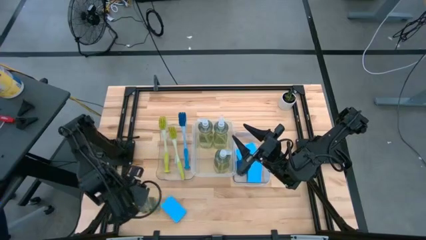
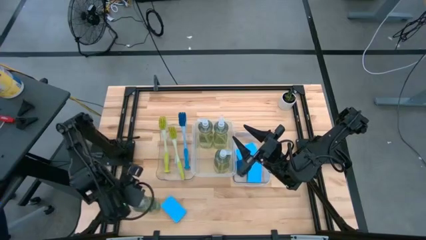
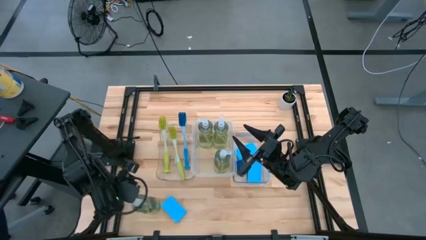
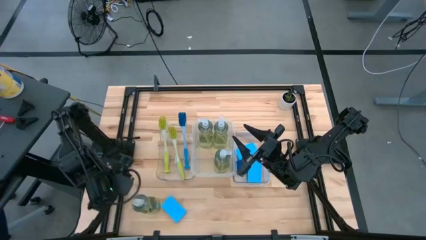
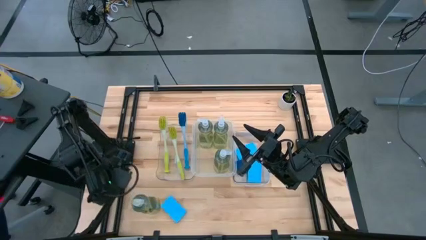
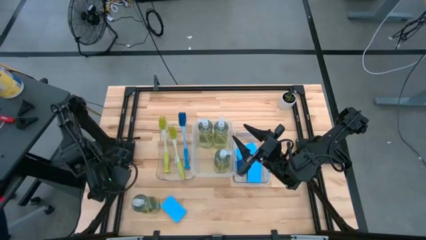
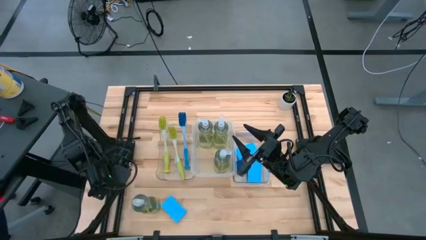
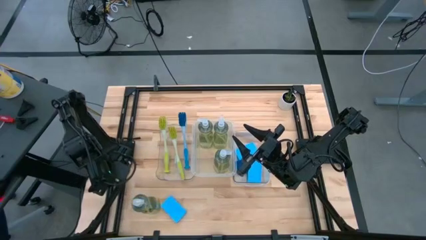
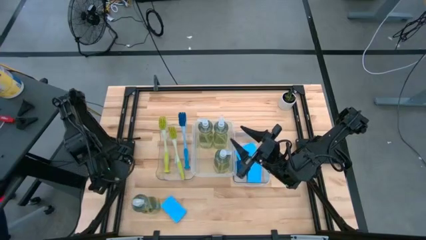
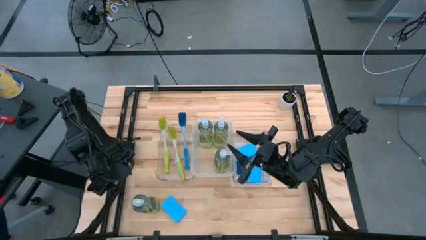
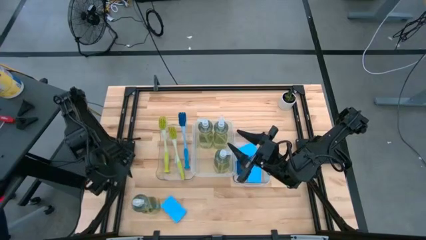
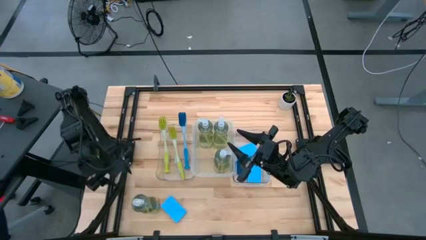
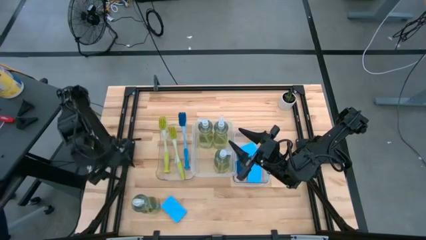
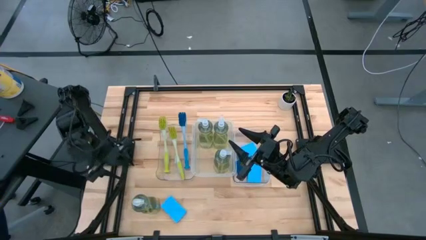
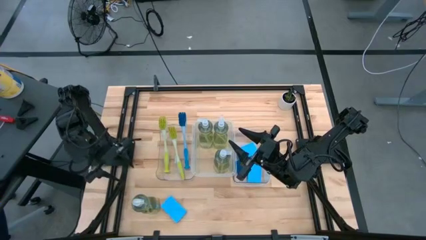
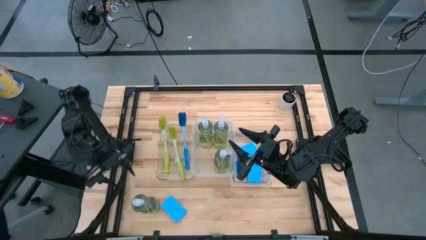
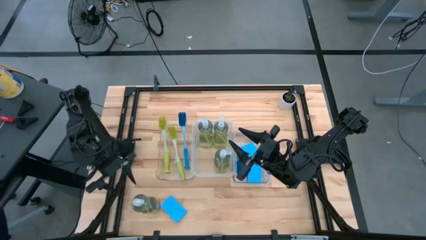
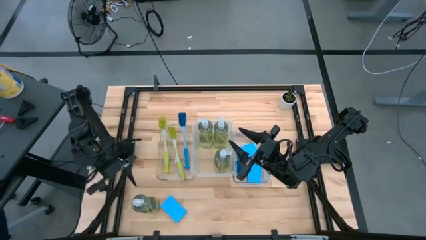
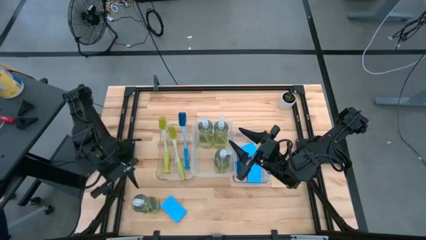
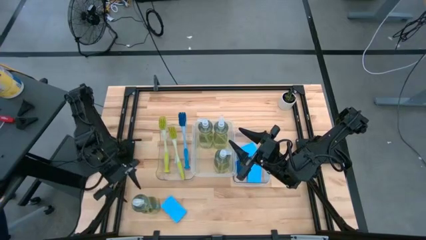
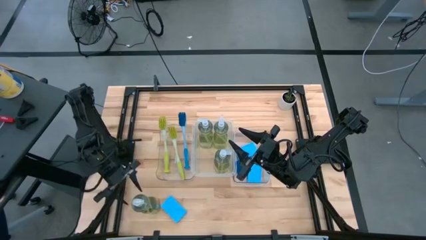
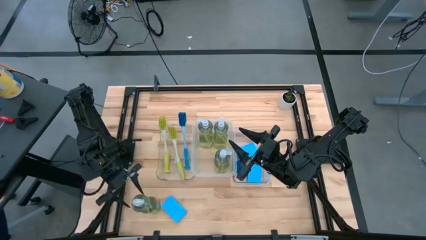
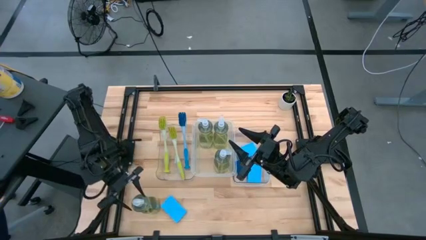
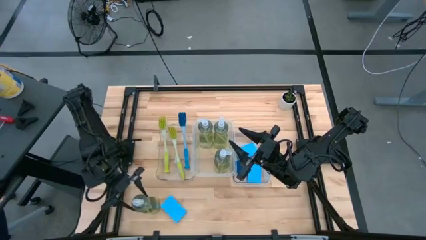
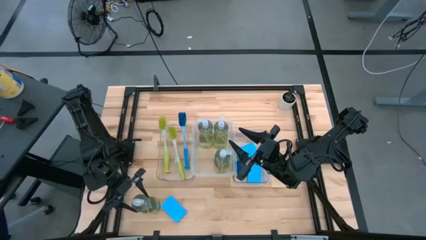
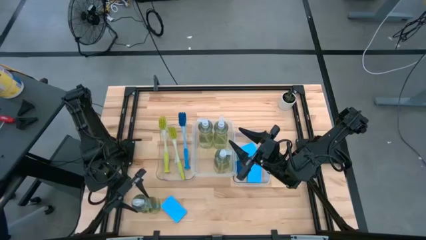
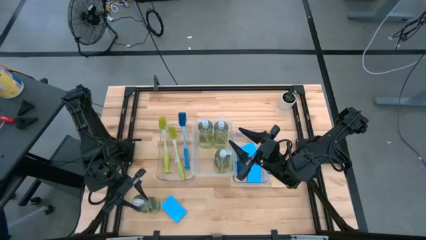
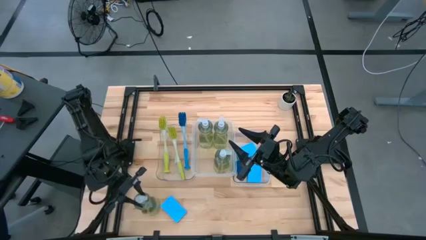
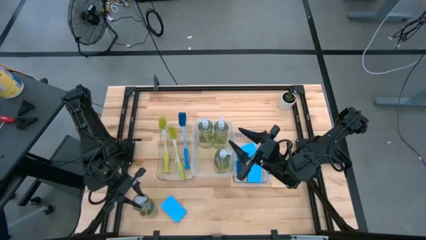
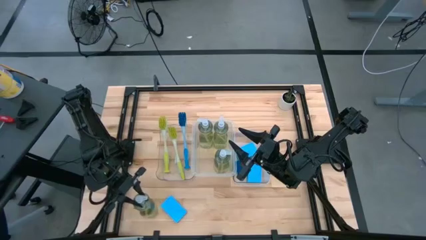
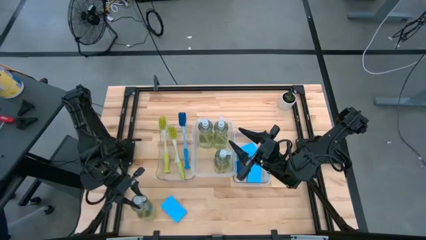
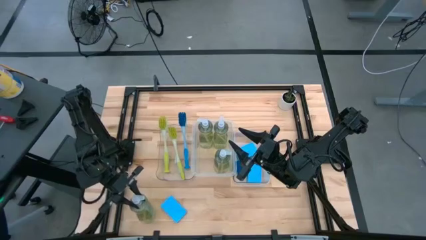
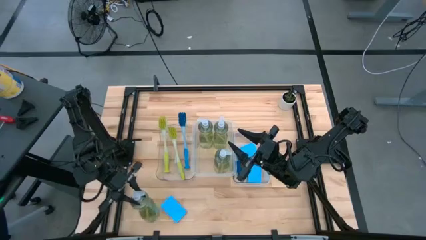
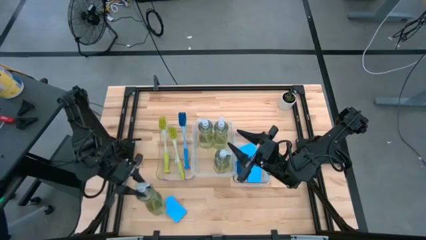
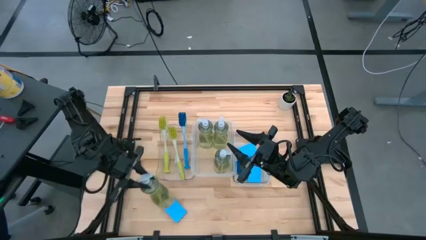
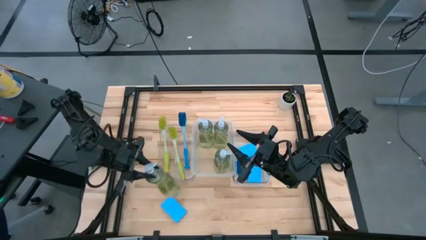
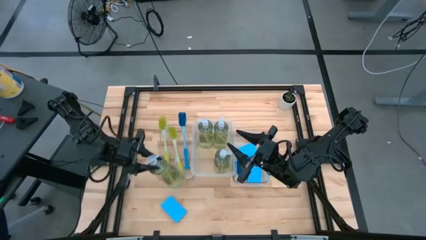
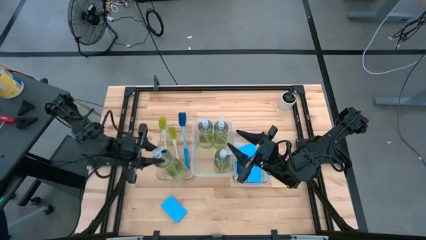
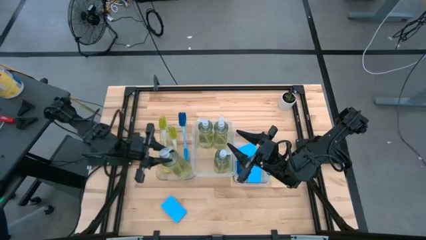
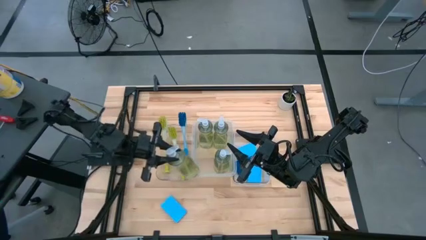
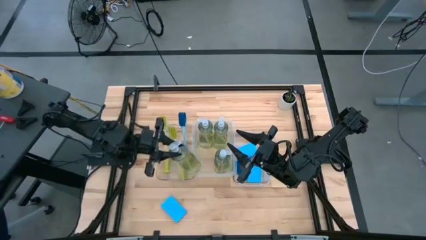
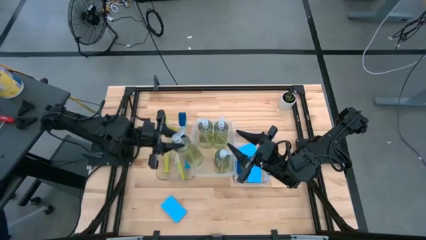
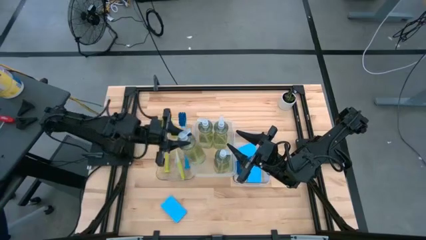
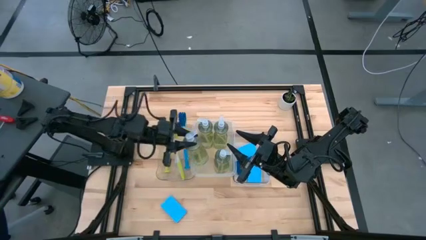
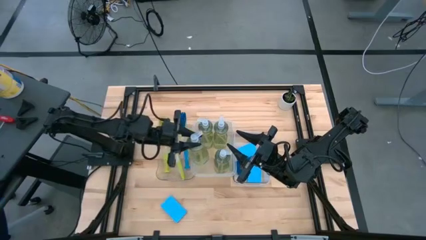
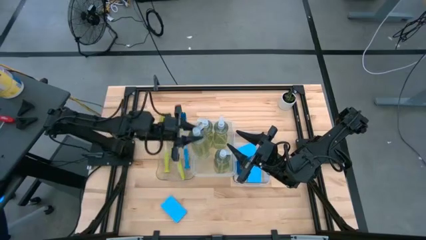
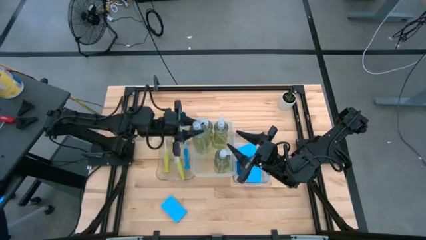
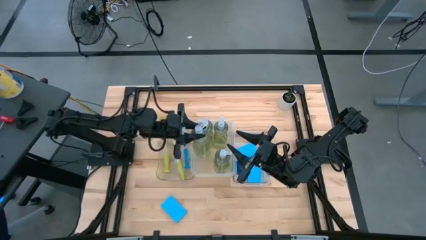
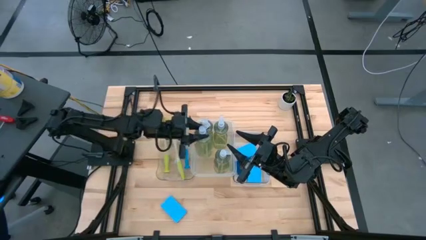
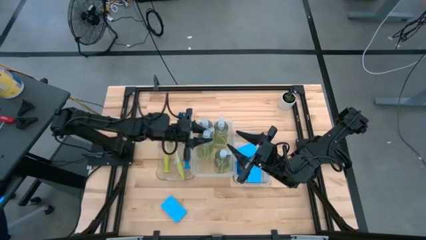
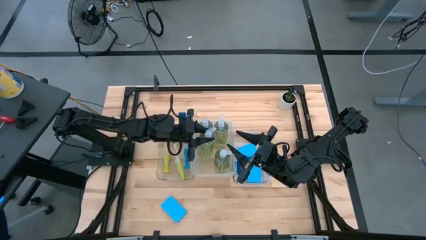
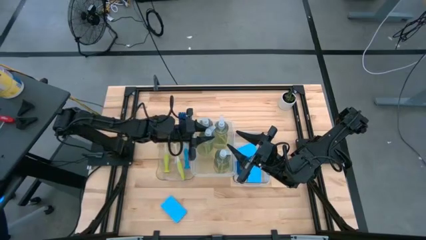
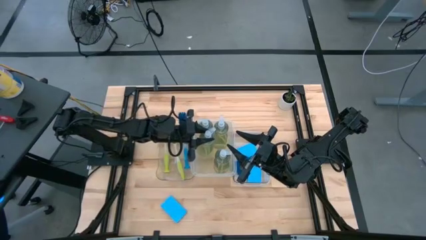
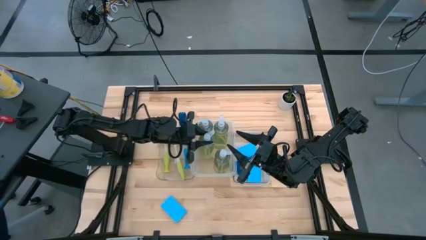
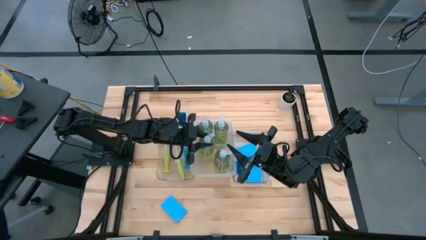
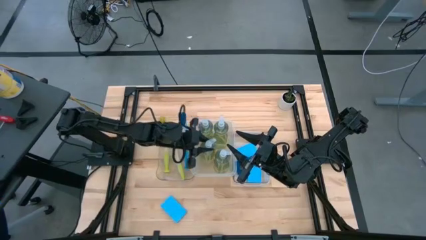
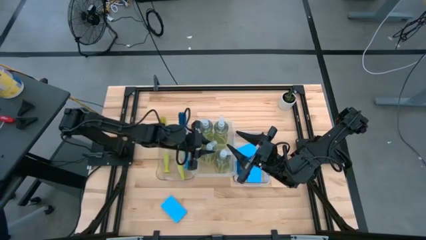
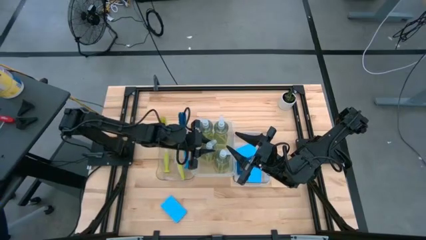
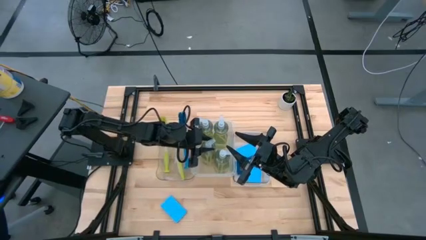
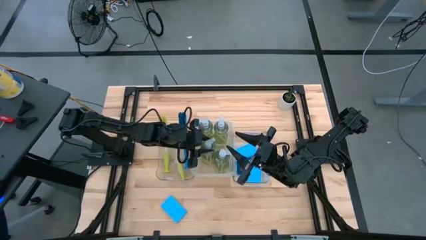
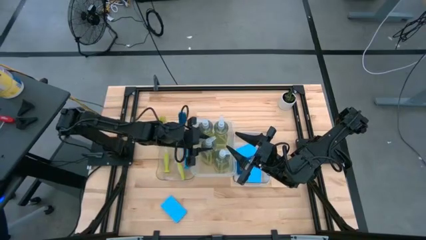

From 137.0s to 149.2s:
Task: Pick & Place Kitchen Sink Supplies
Put the transparent dishwashing liquid dispenser into the middle transparent bin

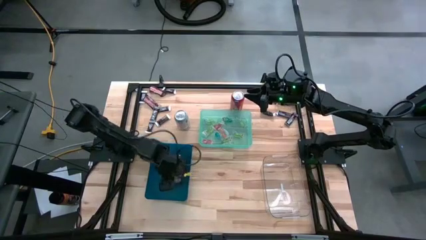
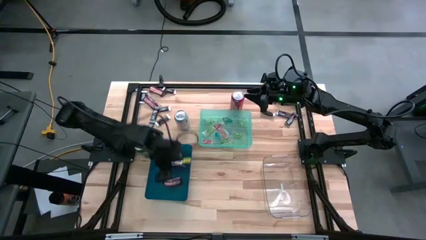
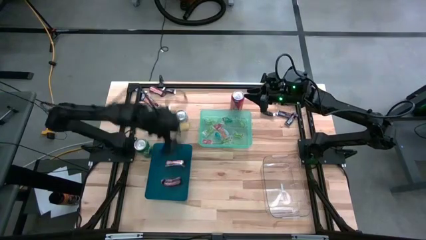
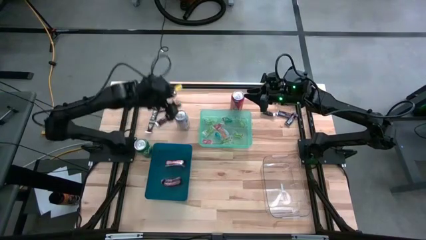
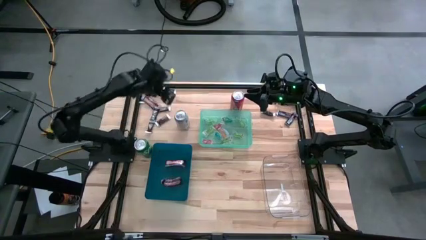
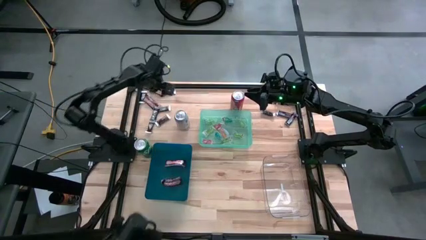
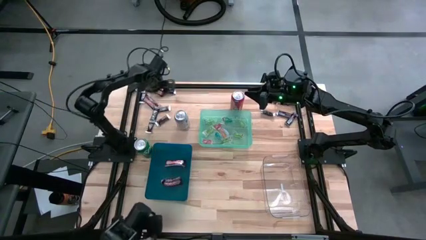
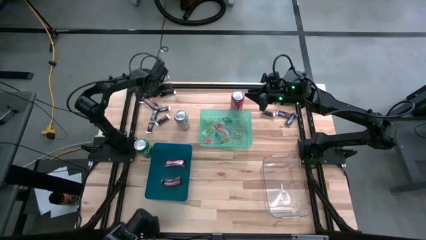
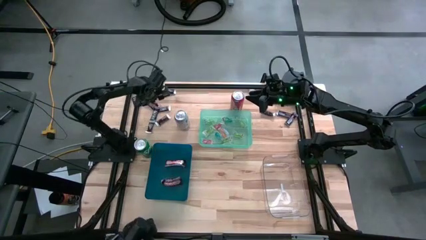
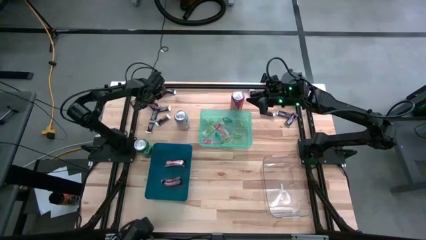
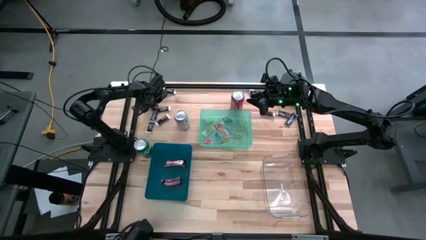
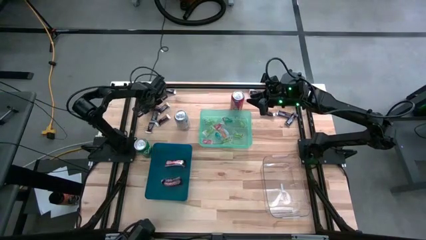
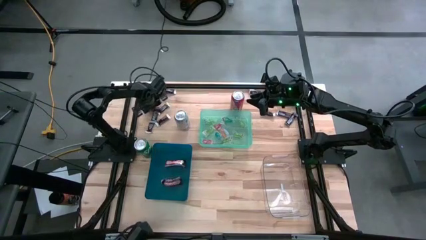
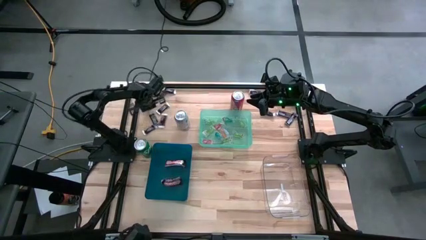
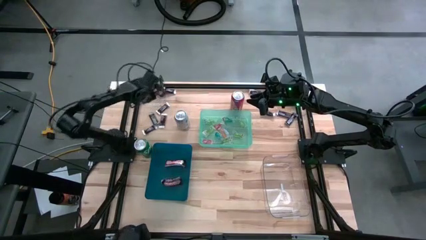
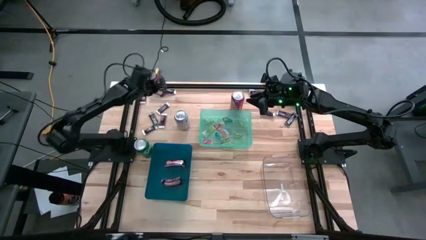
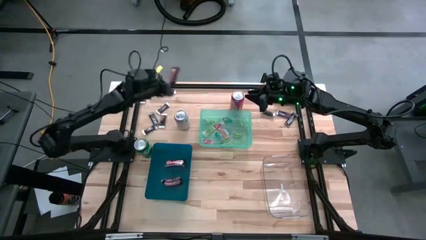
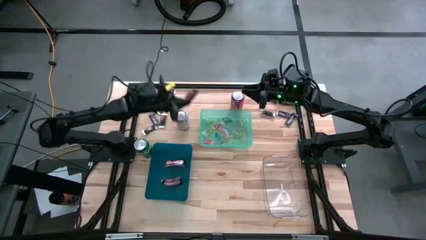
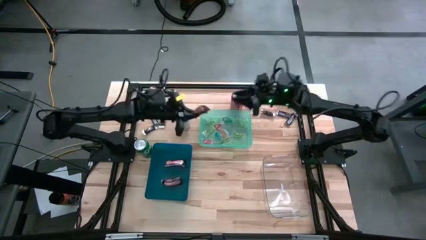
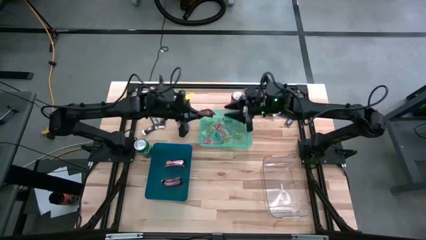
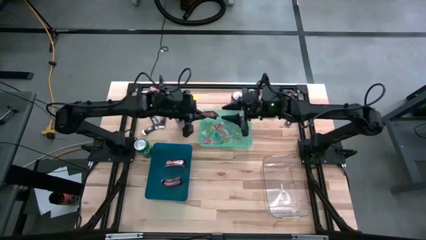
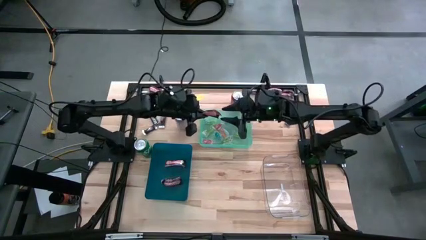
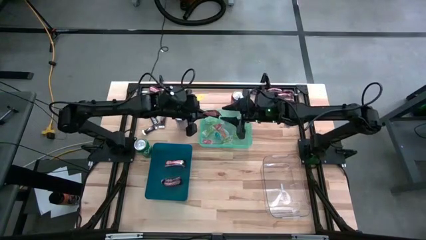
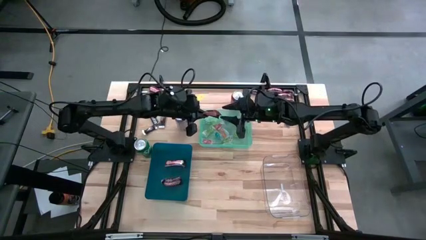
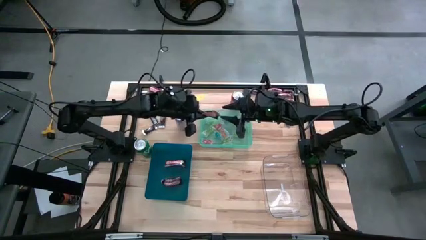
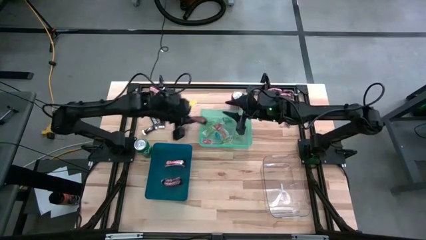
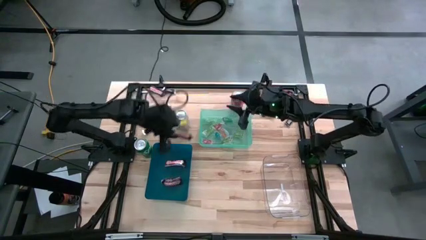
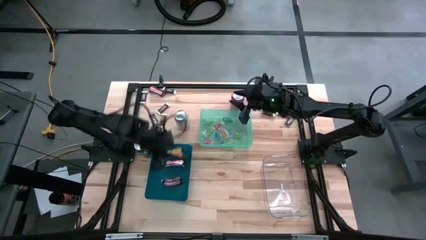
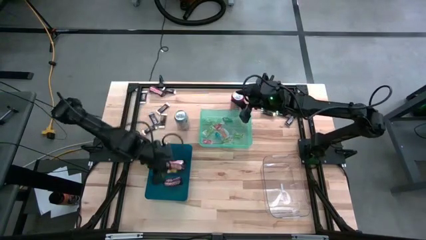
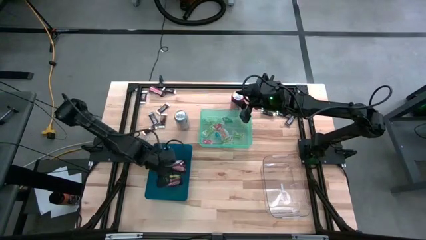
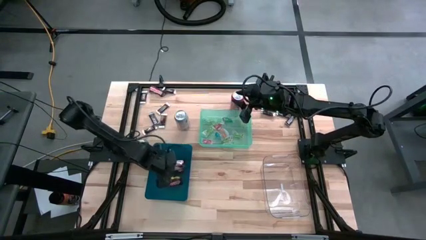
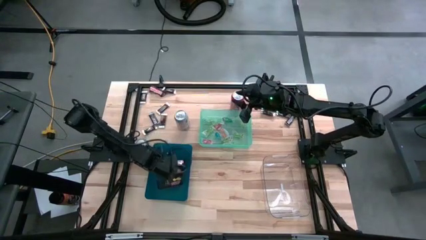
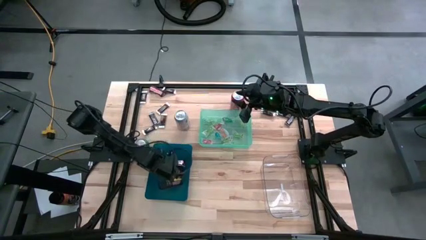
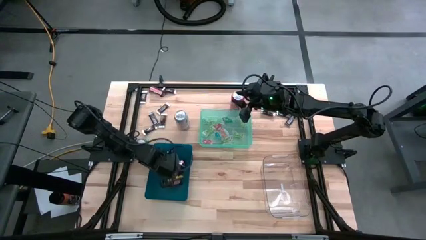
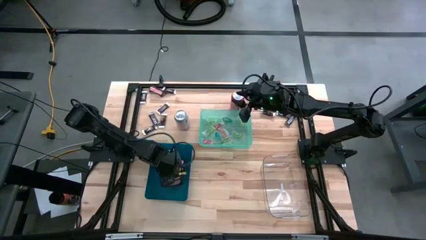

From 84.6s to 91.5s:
Task: Organize candy in baskets
Put the brown red chocolate into the blue bin
